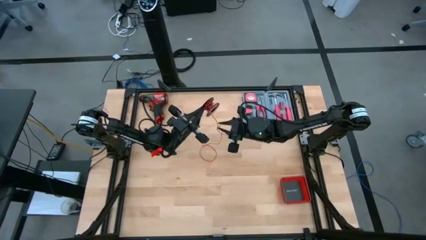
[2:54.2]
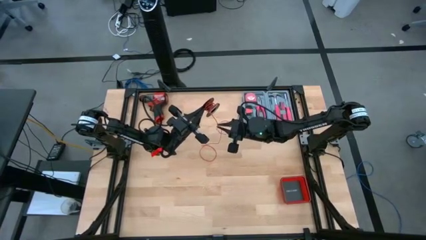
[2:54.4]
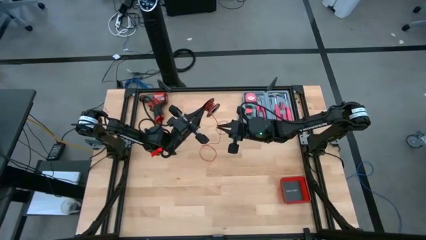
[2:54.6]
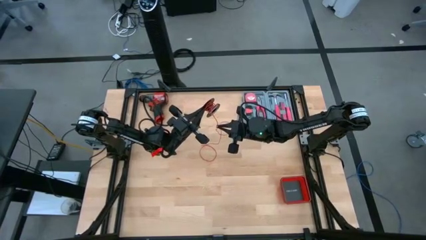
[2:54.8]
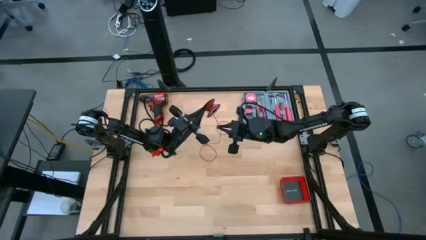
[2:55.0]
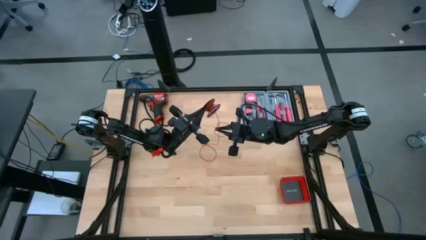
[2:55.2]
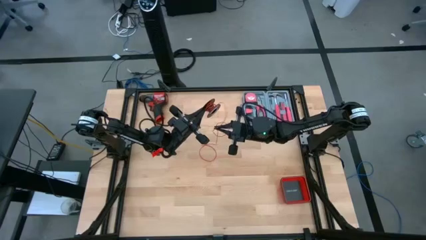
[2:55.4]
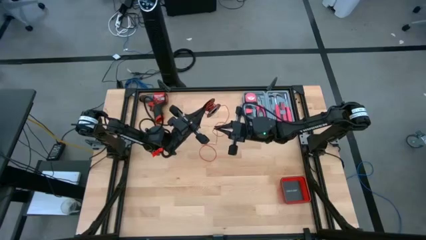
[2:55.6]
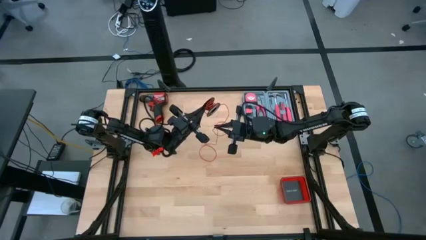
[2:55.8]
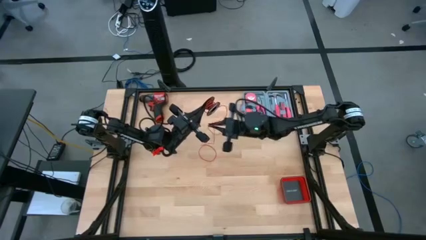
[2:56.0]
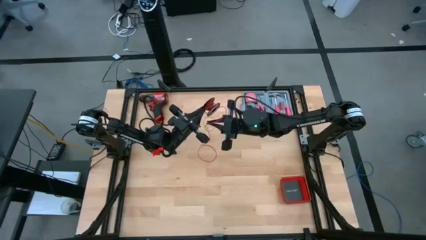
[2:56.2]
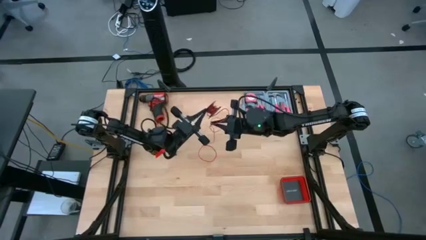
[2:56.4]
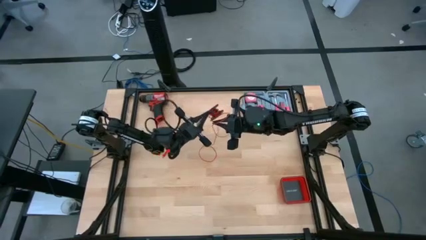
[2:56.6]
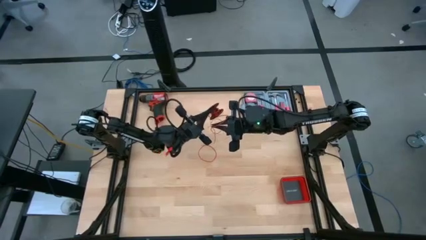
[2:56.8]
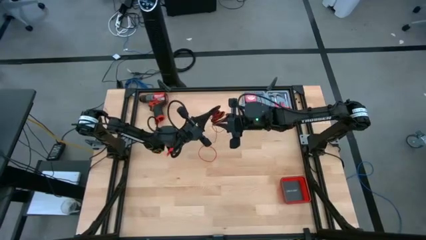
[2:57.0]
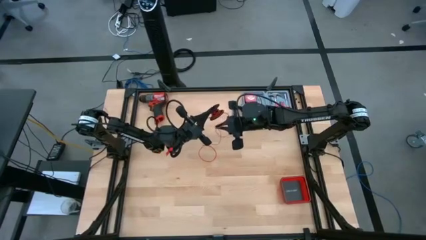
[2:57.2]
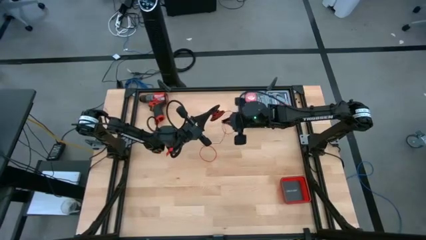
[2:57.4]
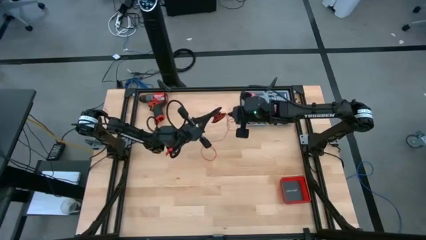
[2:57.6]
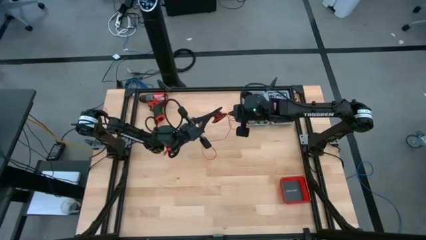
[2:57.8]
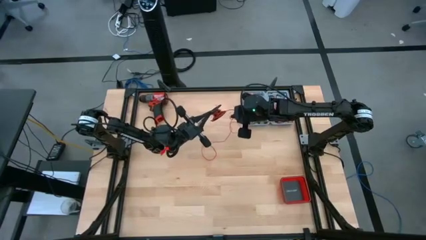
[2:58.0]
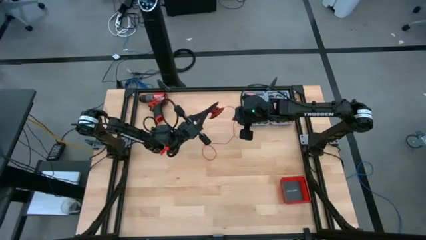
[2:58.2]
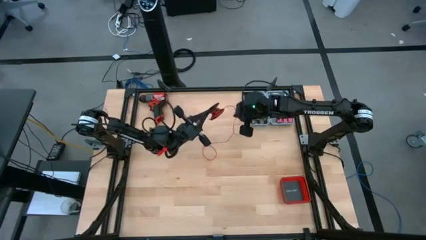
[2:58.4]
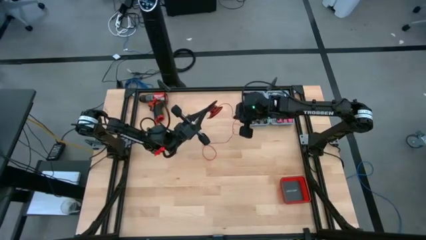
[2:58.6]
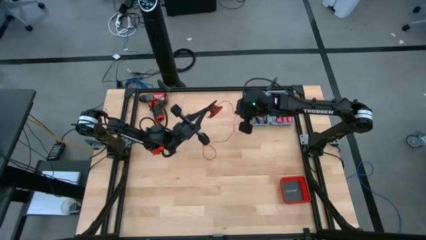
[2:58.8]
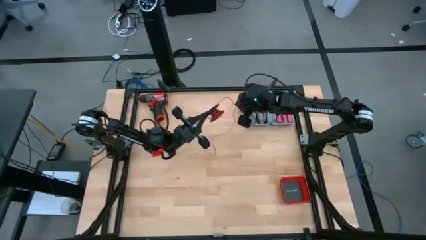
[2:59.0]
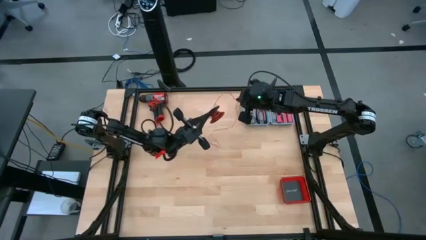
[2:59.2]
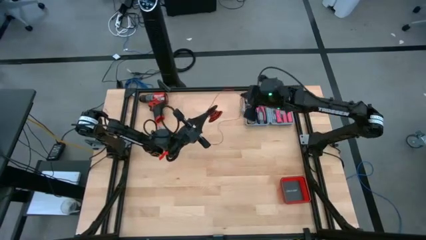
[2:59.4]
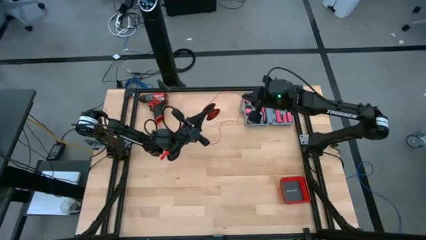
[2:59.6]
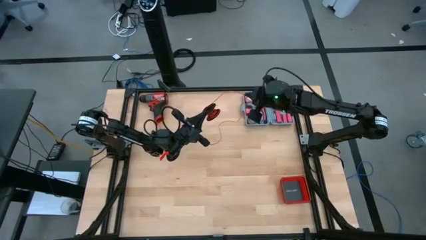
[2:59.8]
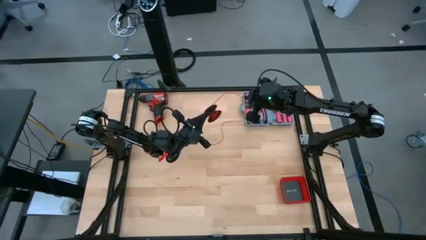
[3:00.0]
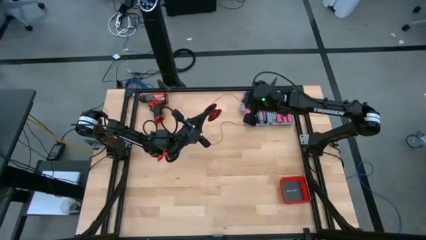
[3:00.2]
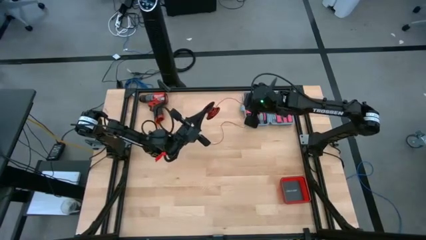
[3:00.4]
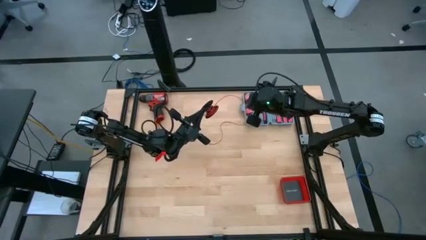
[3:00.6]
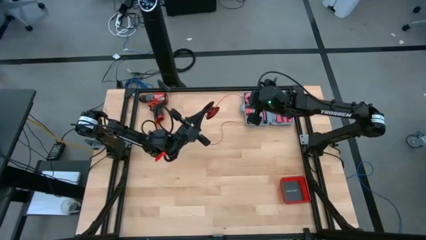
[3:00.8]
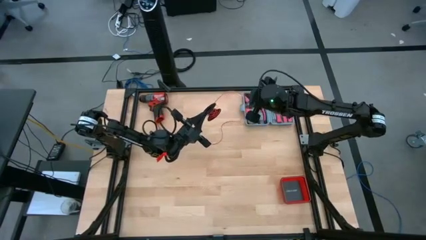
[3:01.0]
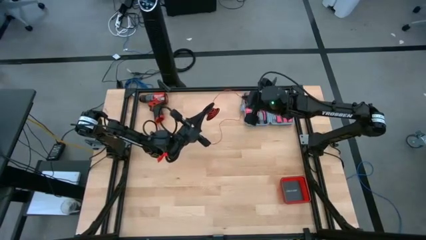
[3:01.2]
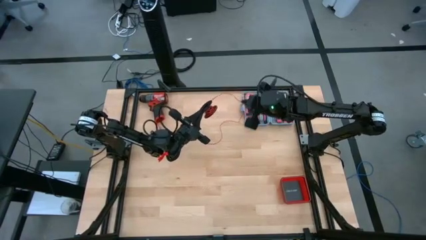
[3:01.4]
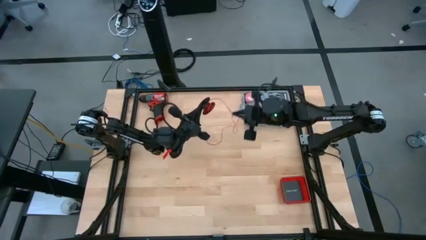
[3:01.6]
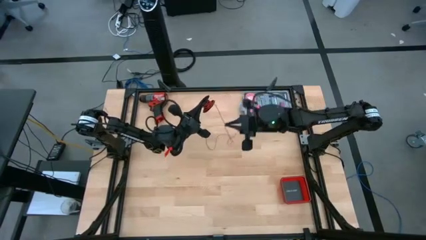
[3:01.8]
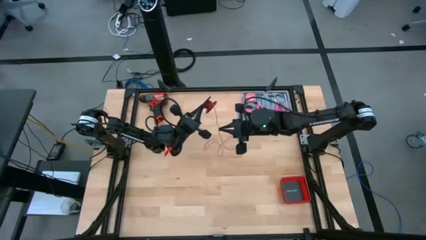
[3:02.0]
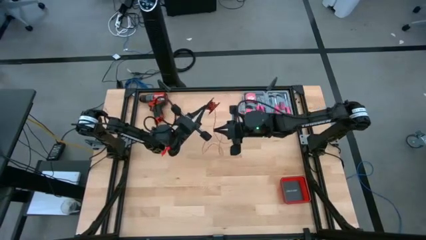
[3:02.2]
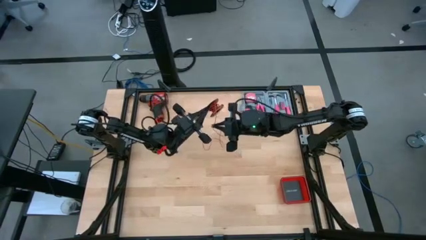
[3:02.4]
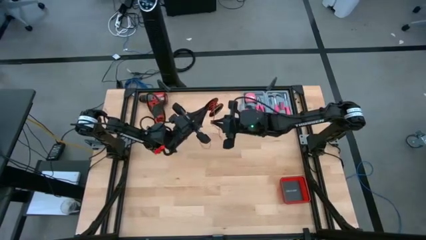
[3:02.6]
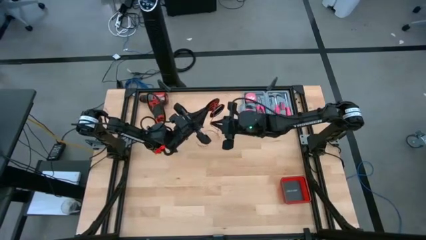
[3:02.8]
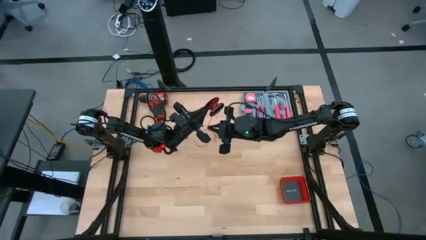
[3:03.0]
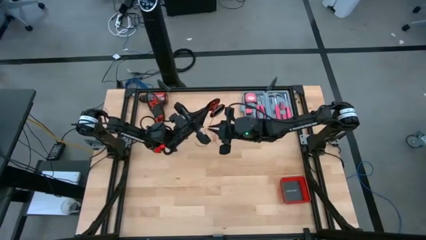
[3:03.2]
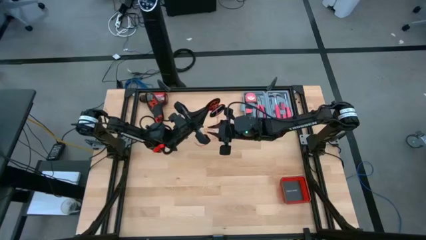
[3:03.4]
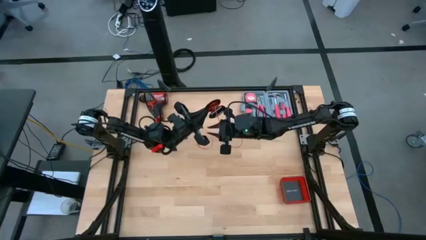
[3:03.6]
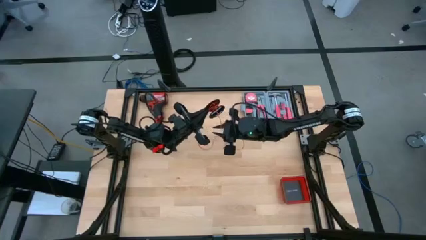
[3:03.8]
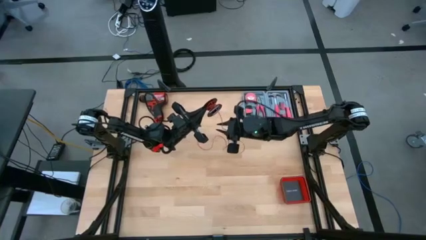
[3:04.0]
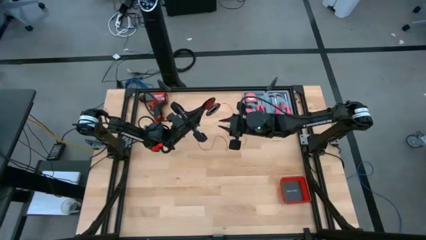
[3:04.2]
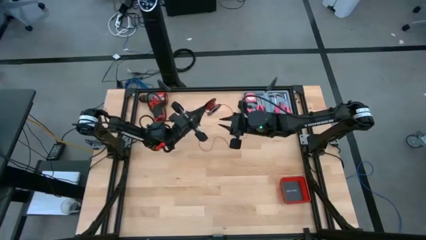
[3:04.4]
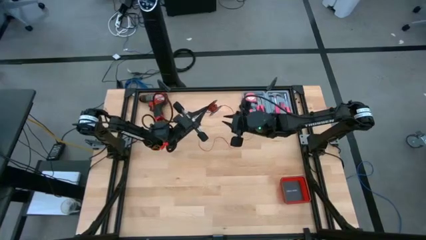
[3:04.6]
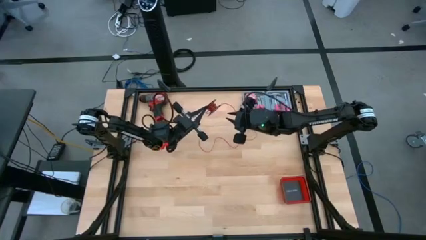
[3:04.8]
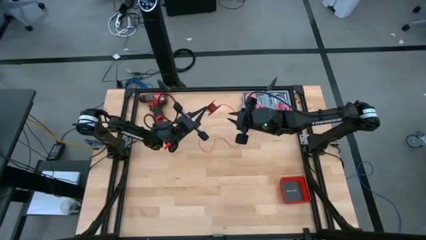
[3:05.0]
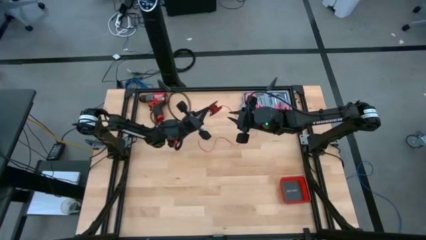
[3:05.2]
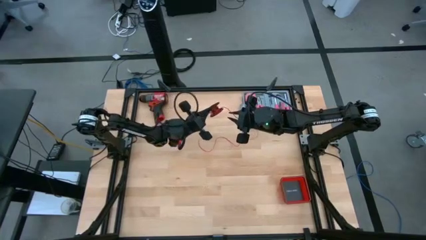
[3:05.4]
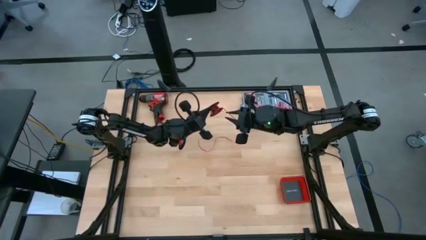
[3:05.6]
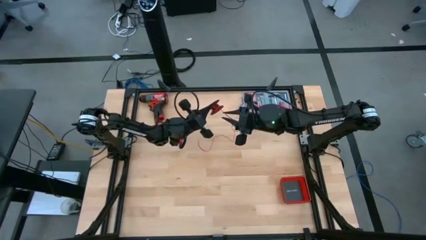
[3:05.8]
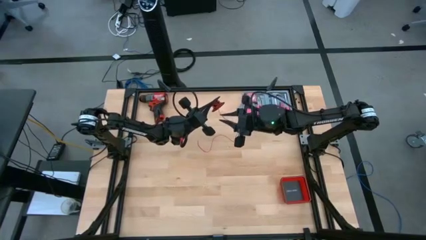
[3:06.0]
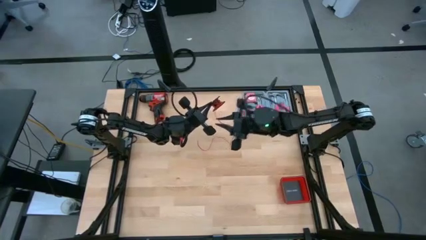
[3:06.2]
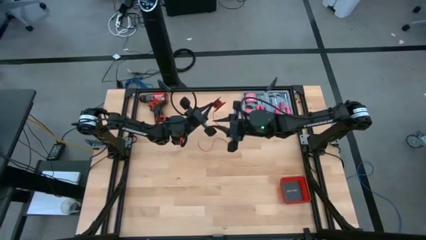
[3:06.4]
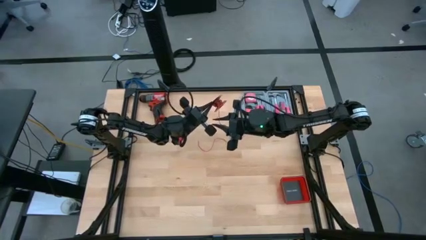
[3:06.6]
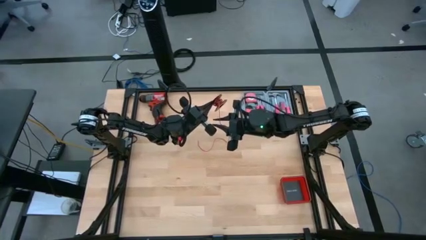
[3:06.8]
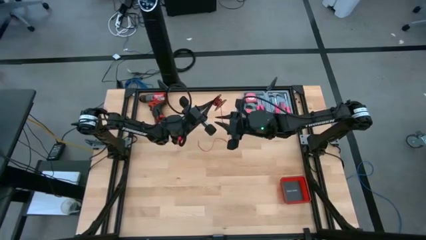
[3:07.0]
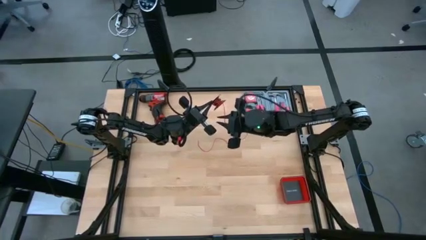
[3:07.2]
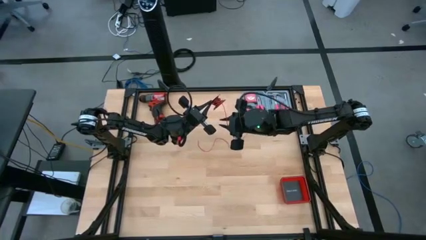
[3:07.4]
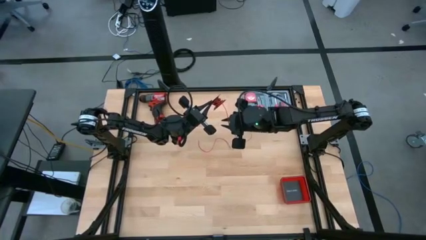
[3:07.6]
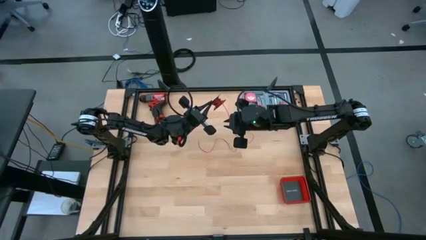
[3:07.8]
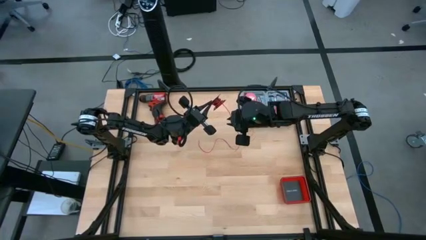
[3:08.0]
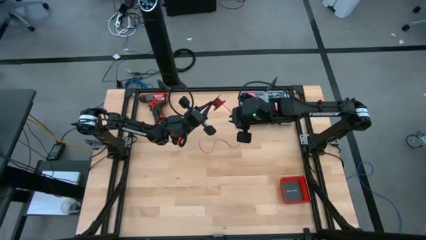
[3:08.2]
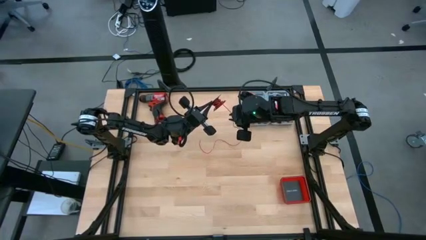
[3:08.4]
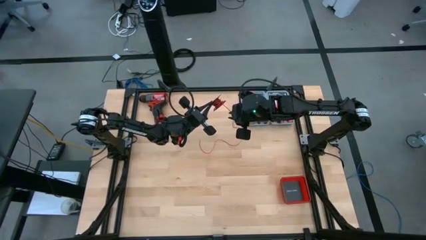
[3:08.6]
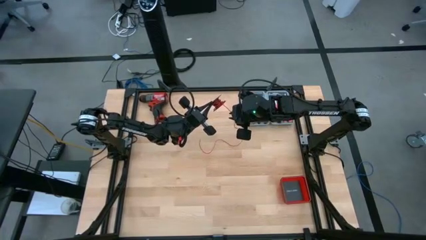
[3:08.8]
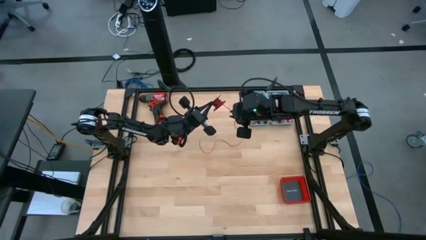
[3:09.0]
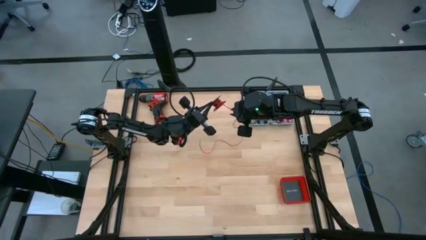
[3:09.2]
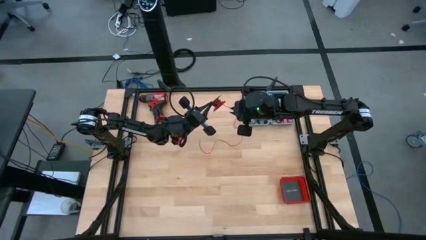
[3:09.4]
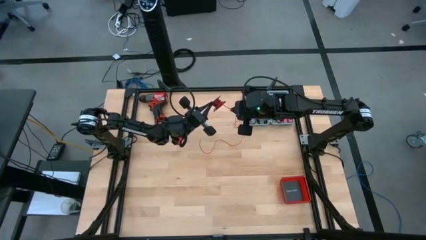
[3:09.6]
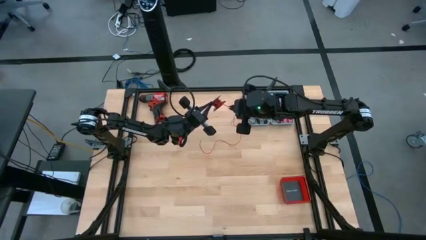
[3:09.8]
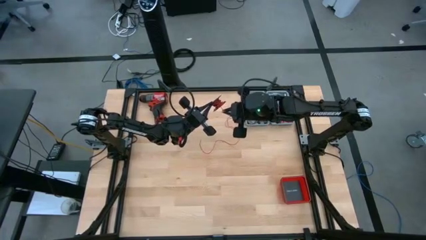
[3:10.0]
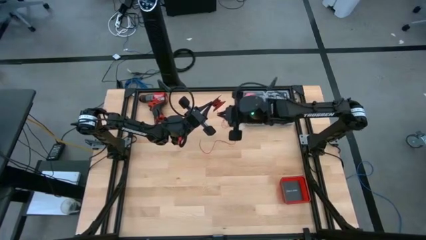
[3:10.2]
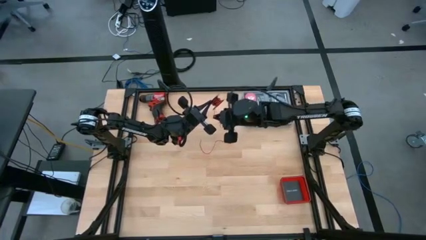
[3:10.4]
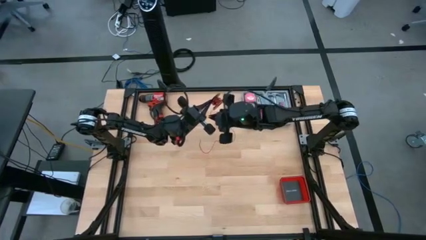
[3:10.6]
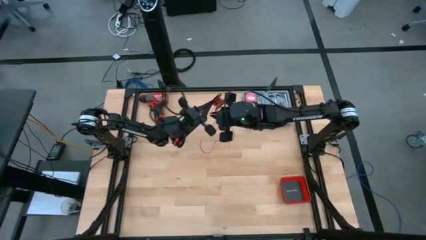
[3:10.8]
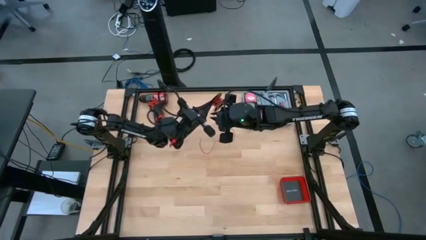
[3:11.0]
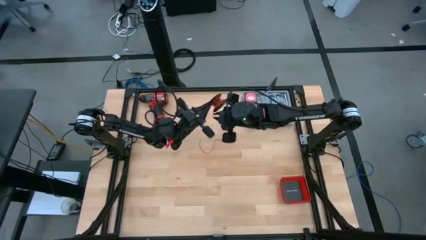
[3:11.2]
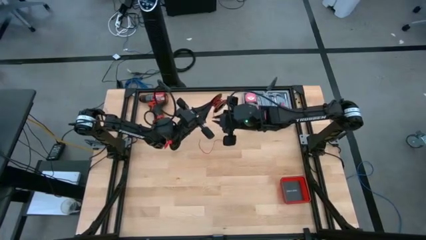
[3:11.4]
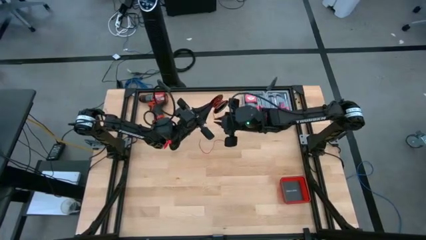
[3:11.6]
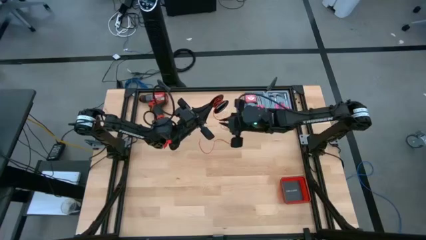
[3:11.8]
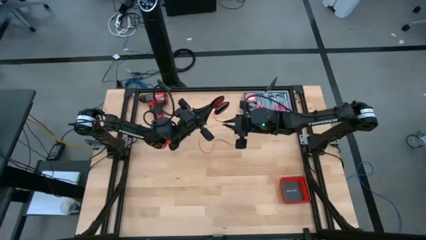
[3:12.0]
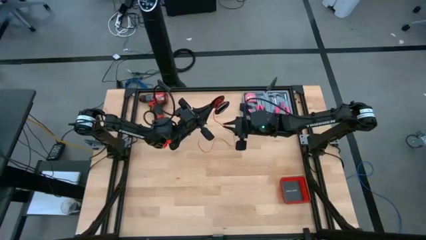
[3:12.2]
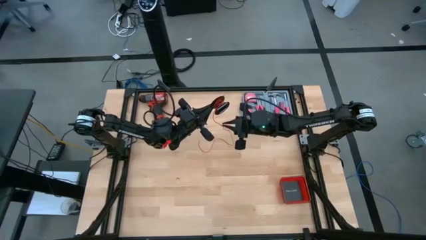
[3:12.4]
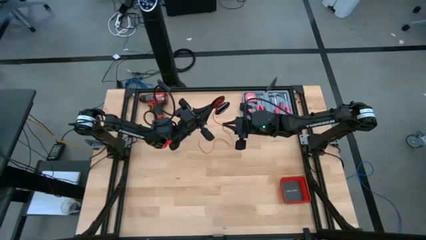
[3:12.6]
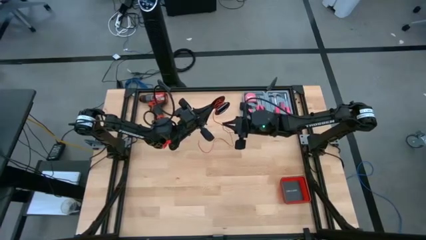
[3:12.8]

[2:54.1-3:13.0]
Task: Coil cords
Coil the red wire on the black spool
